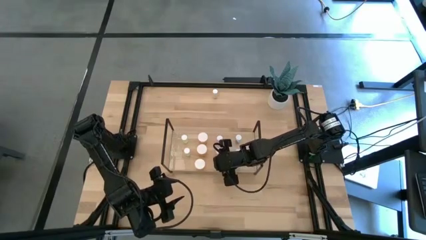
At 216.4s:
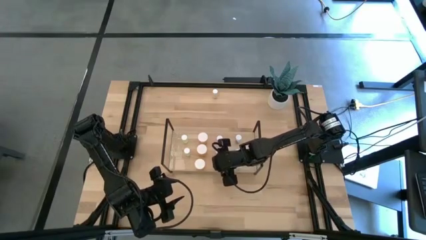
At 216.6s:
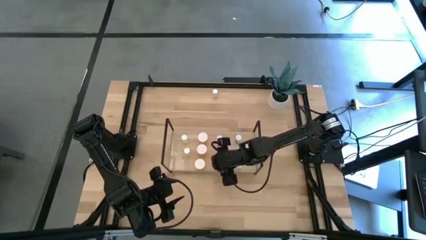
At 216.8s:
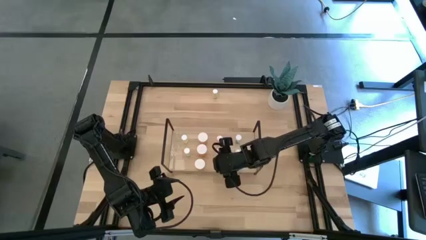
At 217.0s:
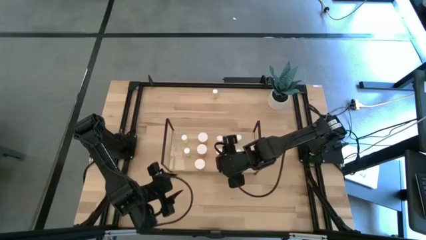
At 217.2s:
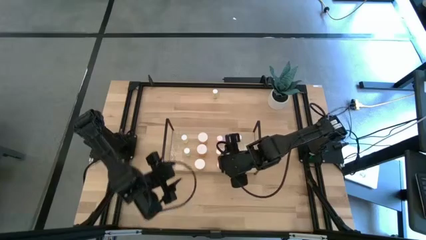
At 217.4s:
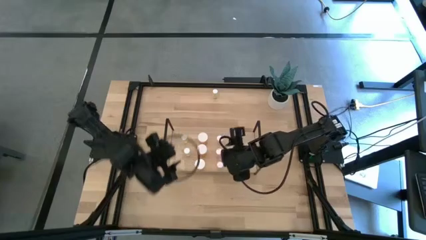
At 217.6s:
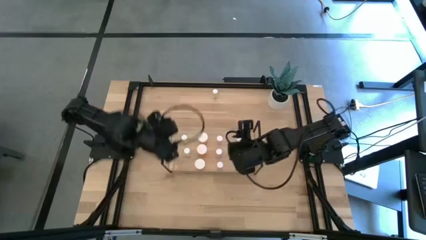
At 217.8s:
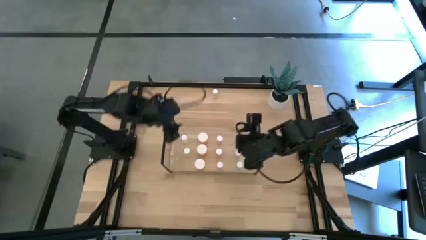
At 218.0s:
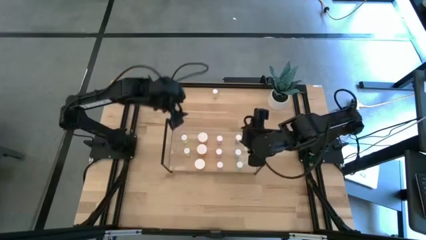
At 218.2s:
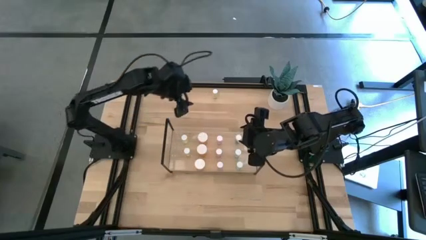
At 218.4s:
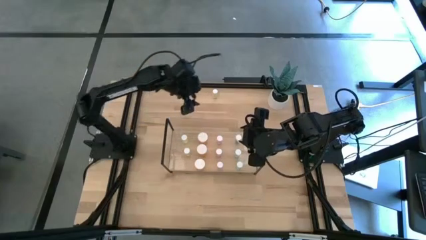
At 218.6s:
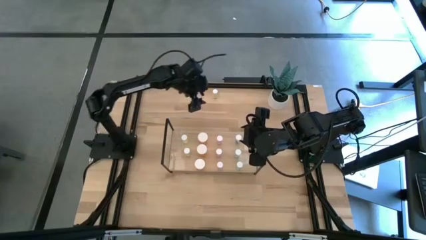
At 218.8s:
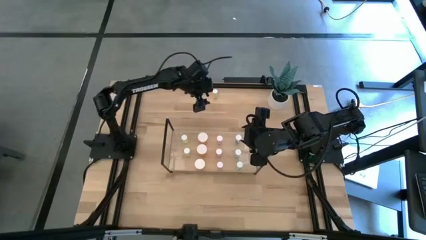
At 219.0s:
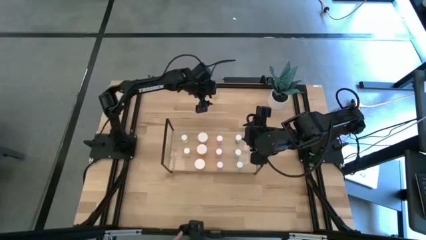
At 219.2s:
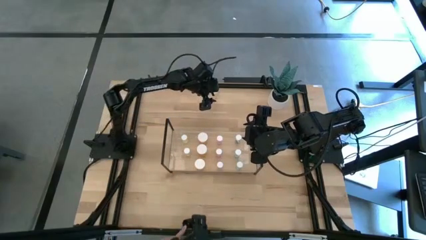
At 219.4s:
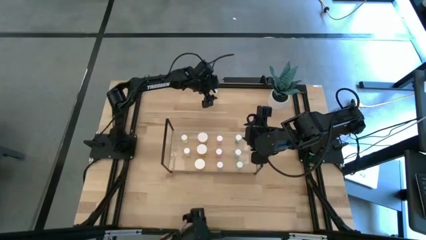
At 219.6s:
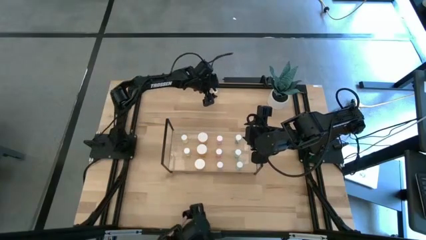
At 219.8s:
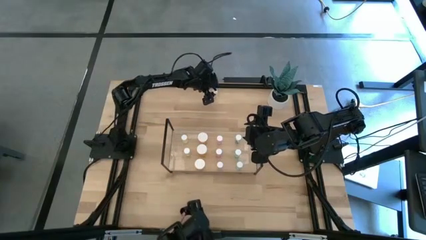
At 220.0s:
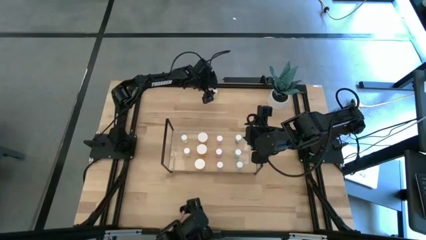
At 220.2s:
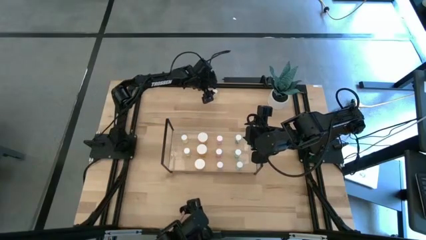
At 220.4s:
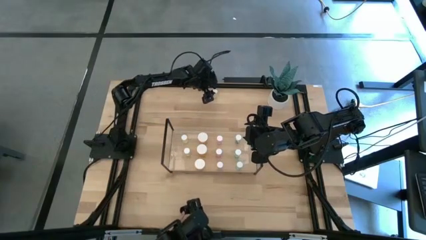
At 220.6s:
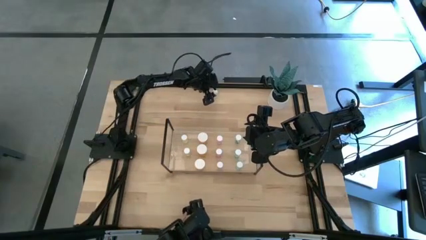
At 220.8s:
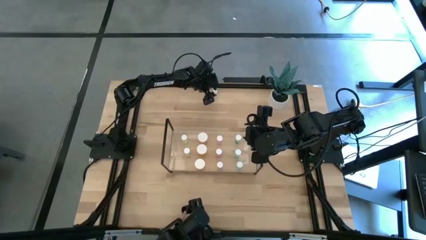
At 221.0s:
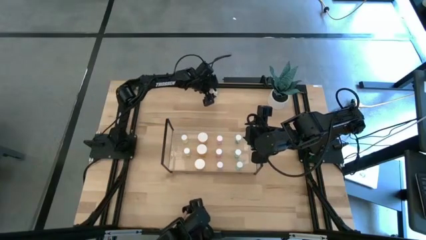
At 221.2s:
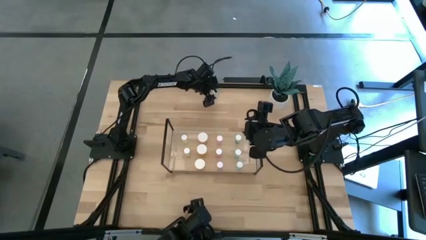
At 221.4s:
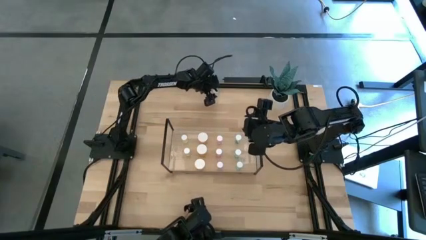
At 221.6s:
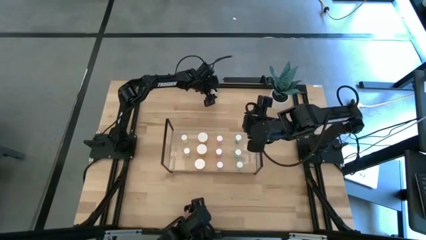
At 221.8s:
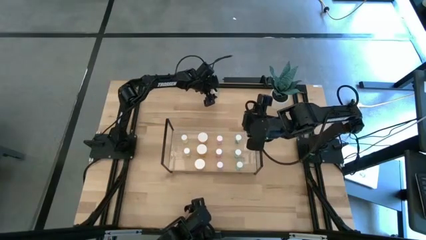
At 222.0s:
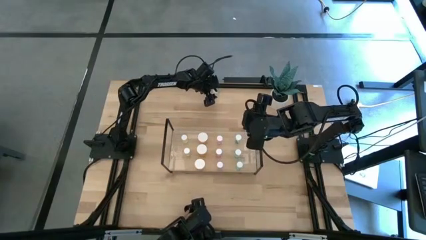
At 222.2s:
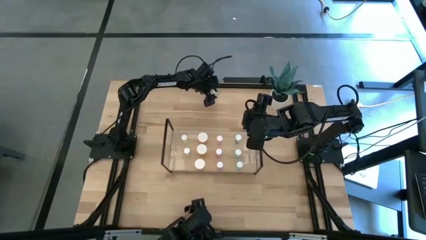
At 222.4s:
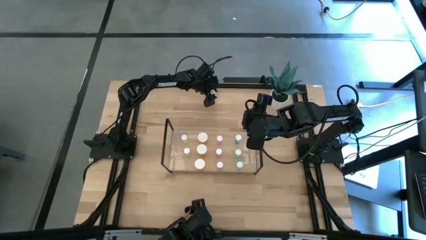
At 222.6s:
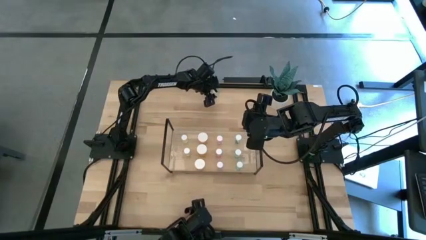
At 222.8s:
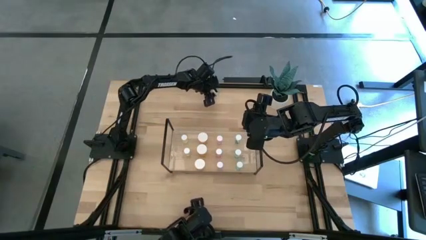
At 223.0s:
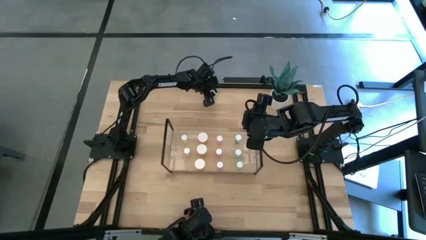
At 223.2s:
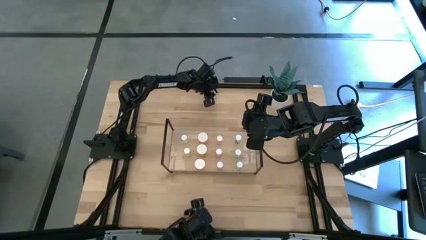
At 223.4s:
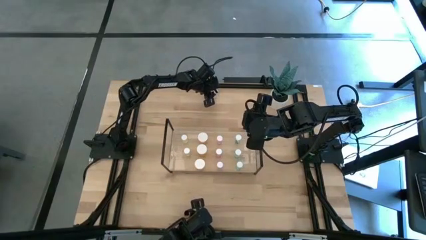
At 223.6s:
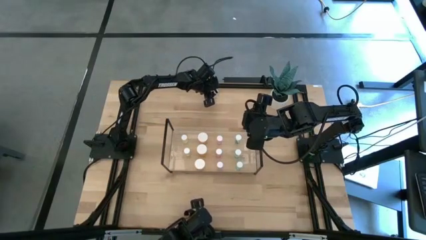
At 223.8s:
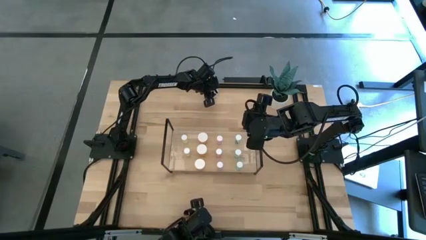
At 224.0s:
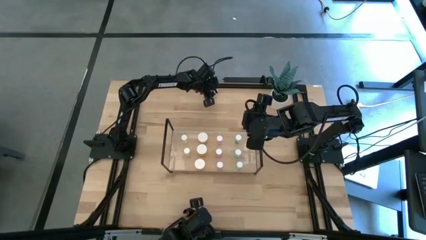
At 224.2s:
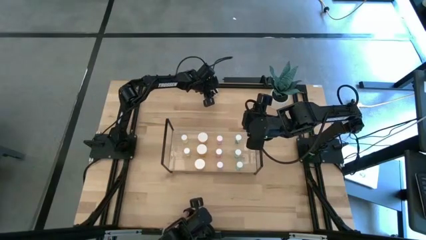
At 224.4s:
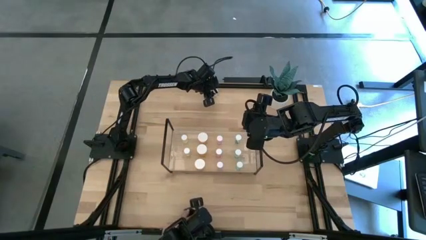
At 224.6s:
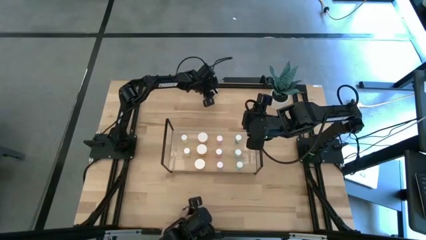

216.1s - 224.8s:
Task: Pick and place medicine bottles onto shelf by color
Put the yellow pill bottle aligned with the yellow pill bottle on the shelf

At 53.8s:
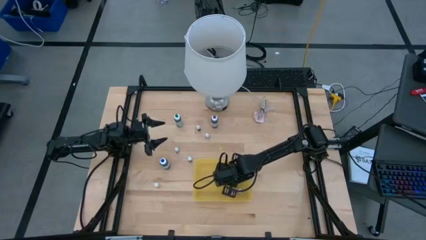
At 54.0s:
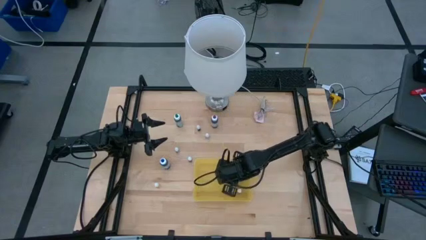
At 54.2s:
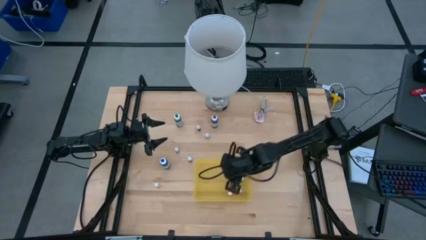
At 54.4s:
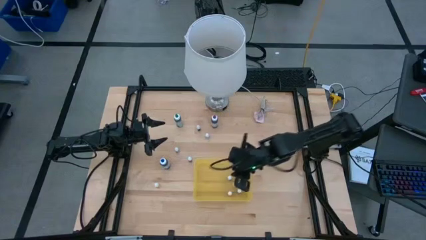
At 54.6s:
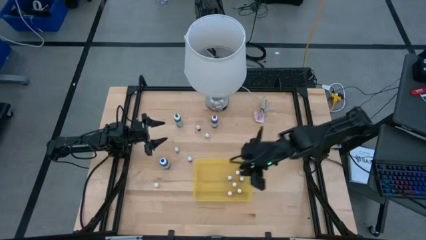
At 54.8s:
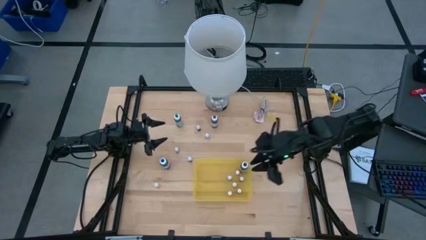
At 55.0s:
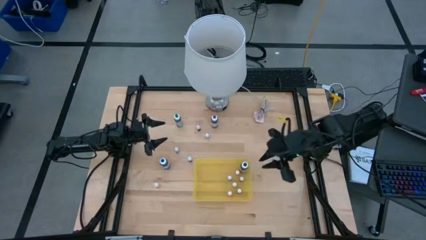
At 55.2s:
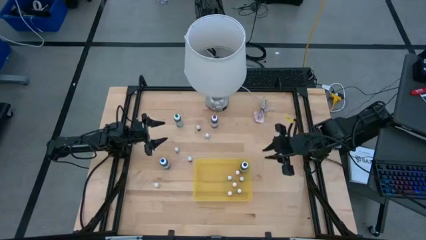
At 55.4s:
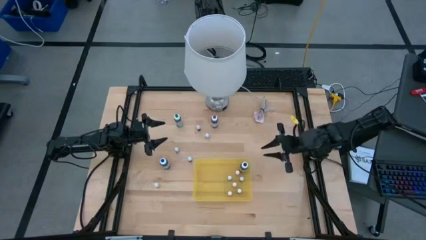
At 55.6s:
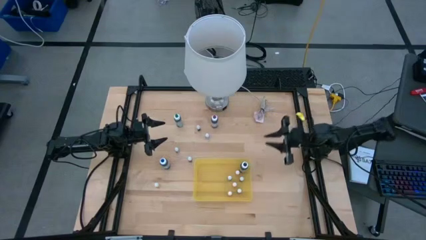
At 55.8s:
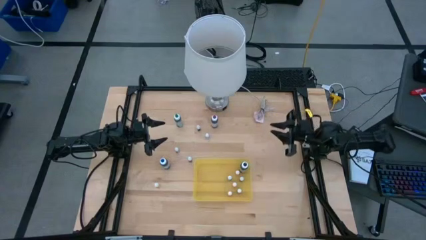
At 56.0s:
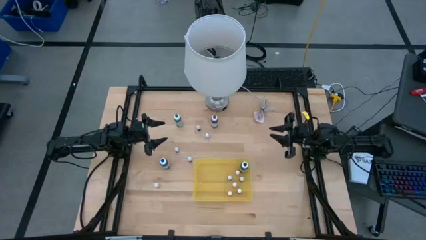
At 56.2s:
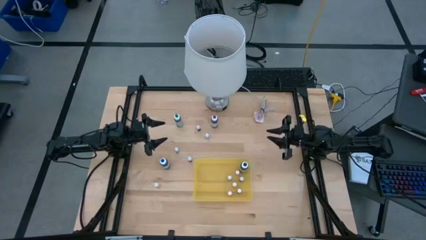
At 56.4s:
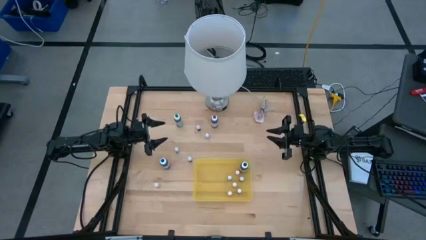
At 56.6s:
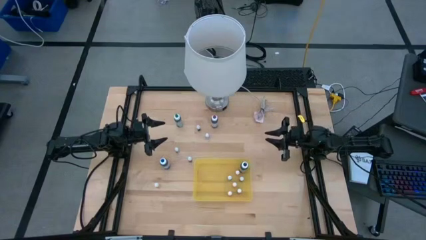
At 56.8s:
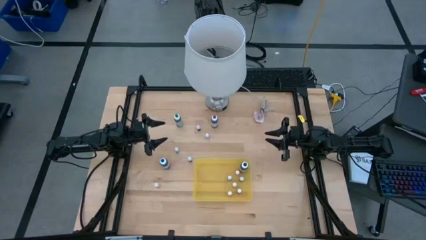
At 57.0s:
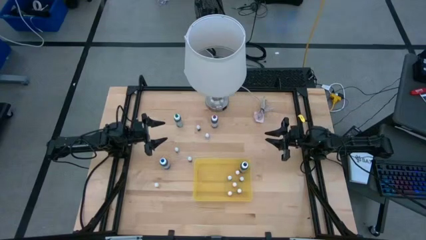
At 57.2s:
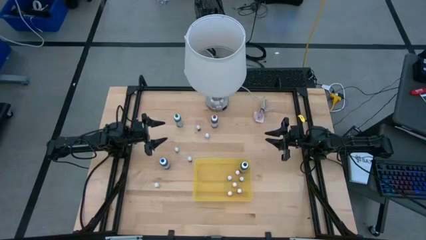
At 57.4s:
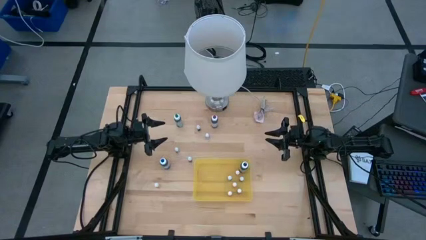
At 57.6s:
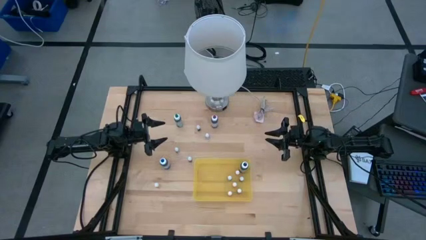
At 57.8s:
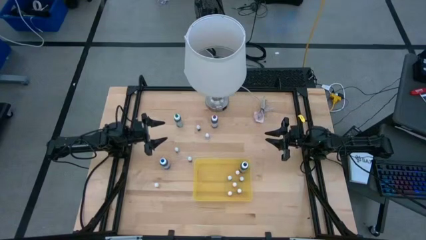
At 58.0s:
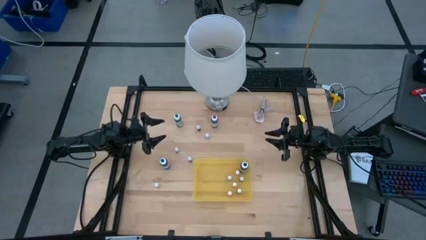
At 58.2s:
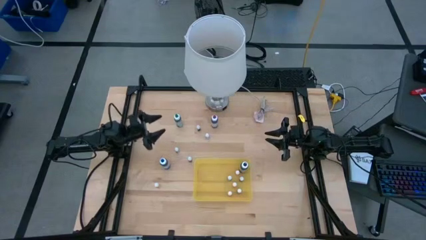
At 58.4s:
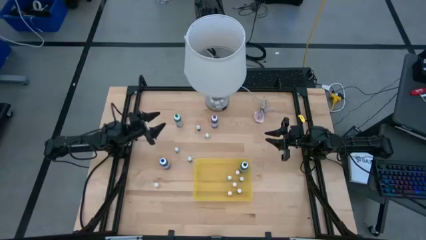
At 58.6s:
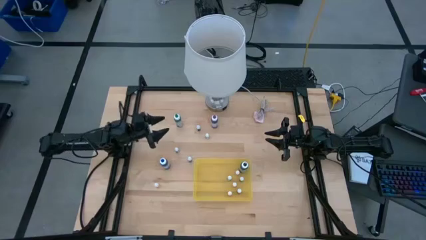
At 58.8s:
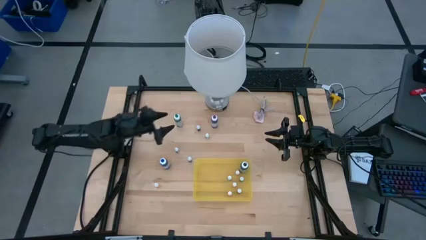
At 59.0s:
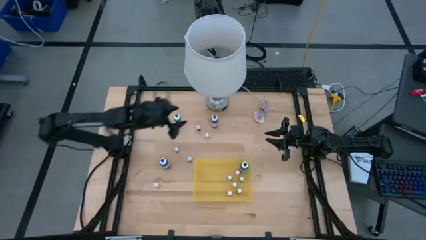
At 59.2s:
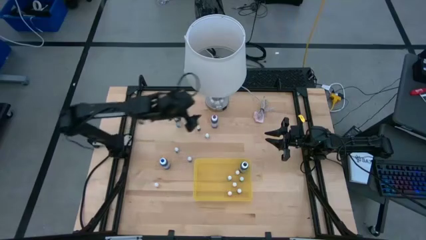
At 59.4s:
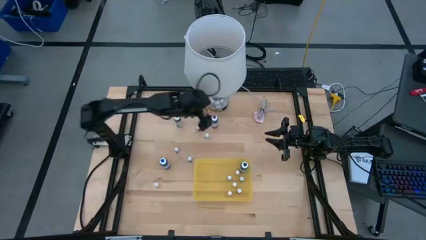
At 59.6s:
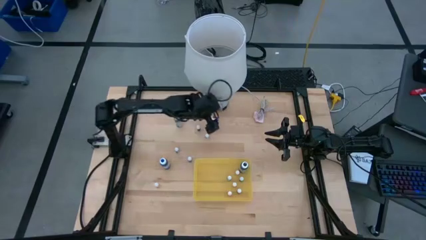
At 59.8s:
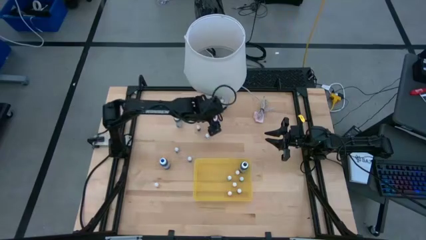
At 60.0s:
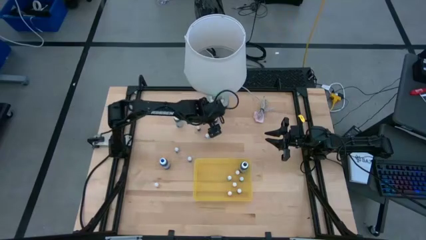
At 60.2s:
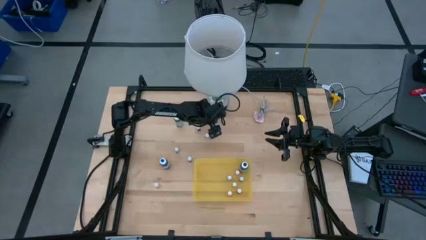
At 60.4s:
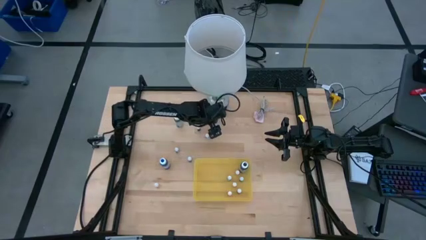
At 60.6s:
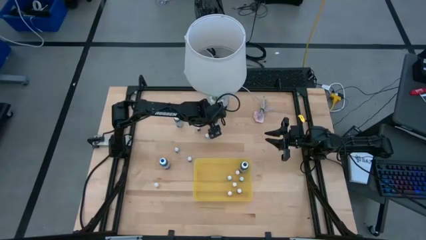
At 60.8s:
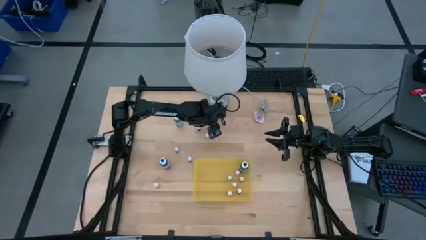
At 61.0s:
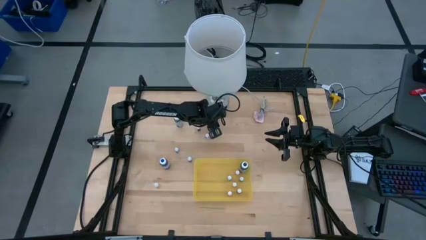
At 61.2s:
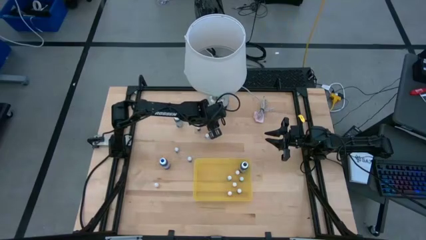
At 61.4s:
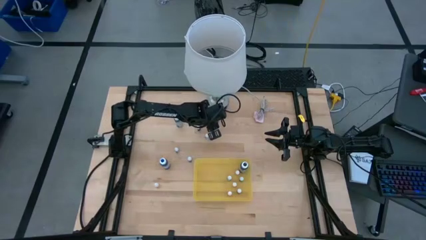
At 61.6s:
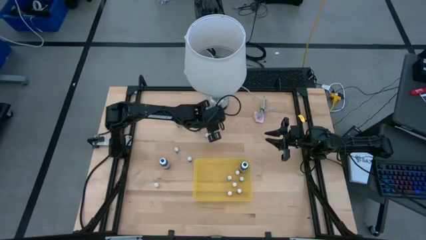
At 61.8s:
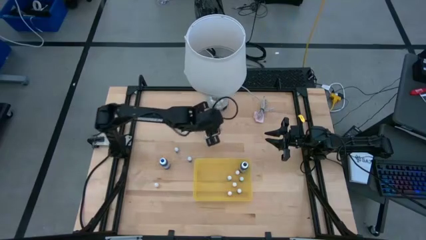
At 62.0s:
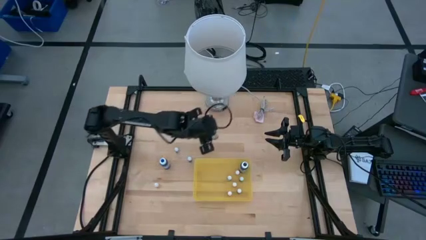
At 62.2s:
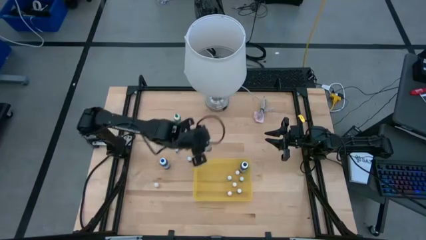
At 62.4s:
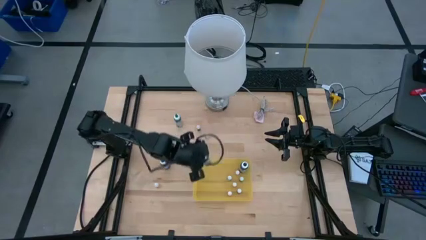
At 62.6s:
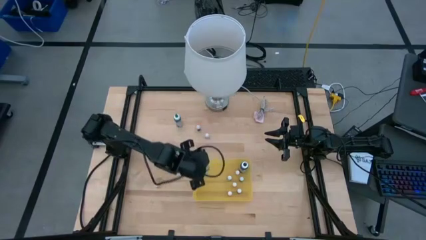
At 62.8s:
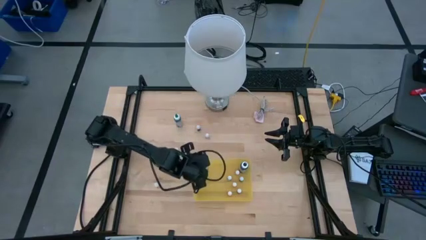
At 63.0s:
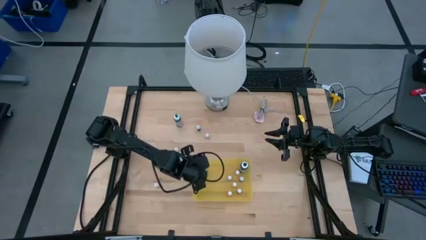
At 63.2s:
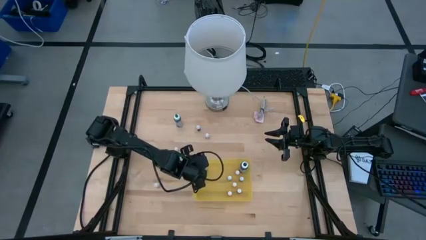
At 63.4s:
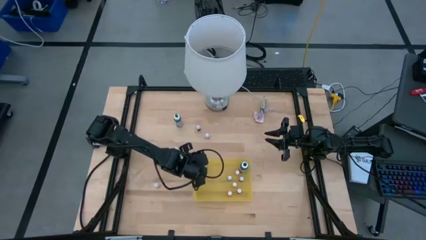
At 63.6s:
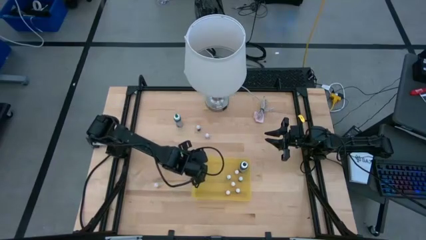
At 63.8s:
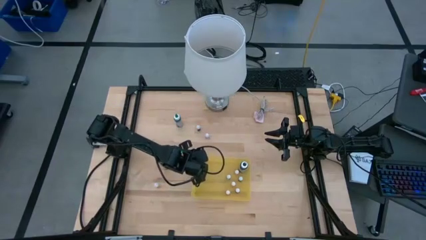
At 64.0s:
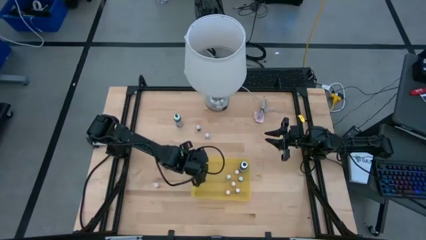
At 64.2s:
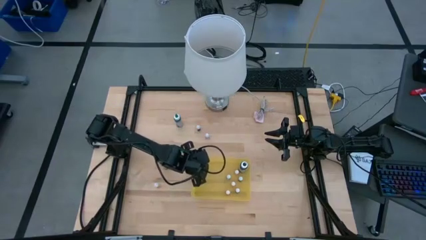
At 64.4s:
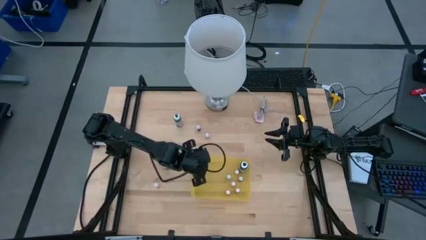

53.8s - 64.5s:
Task: Pick & Place food coloring
Put the large violet food coloring bottle into the transparent bin
